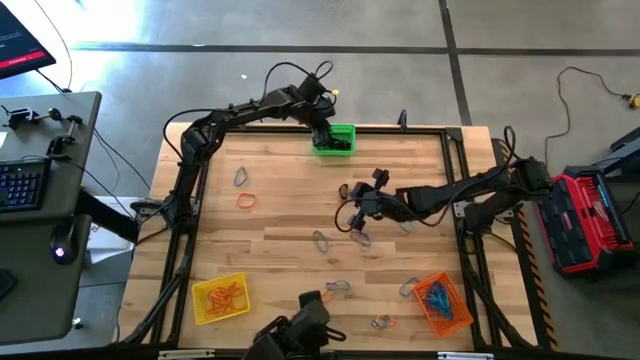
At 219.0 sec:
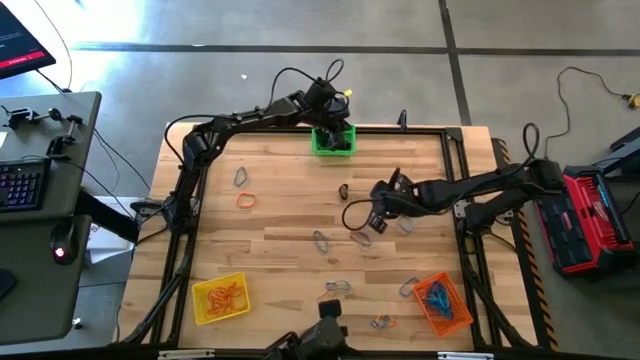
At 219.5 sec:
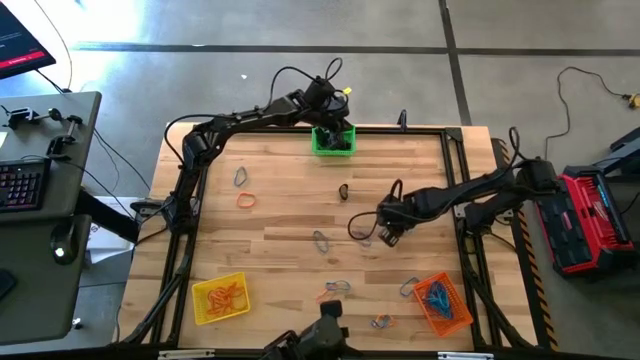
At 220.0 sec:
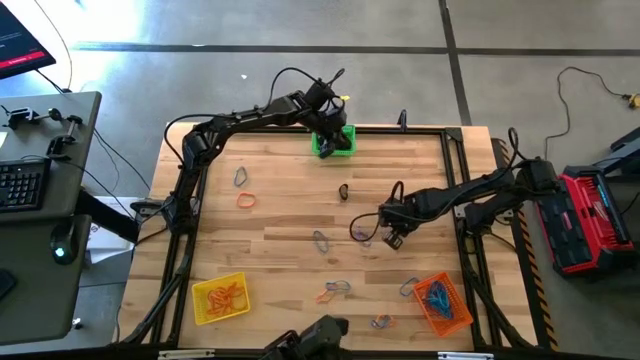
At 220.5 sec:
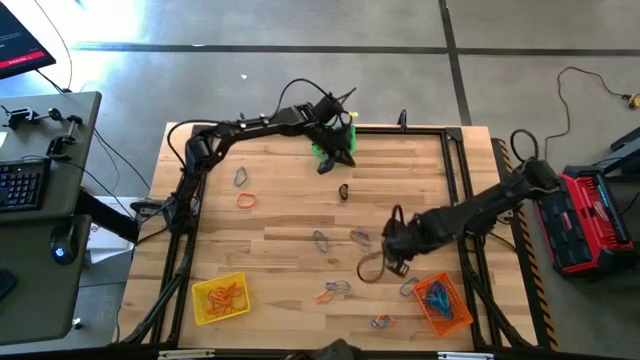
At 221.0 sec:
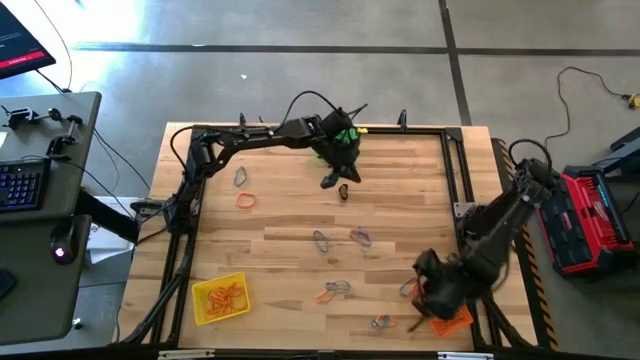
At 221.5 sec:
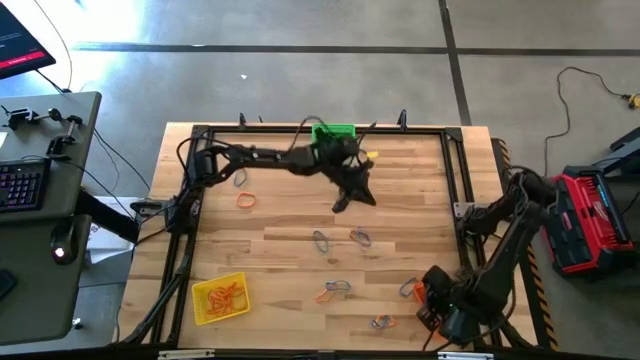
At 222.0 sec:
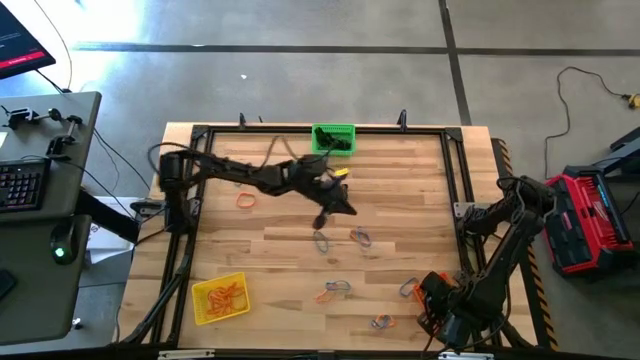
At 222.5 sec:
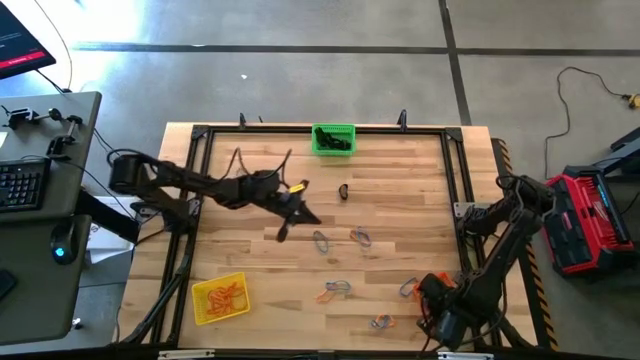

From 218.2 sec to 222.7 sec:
Task: Sort rubber bands into baskets
Put the blue rubber band into the orange bin

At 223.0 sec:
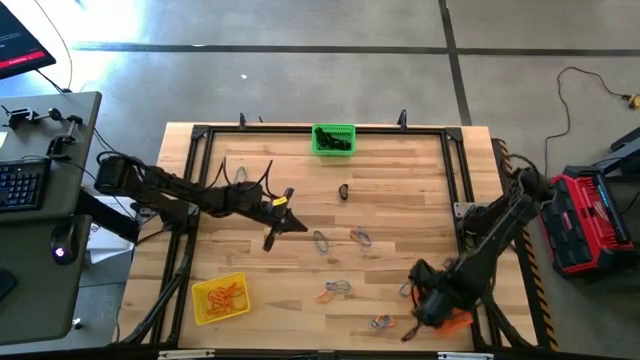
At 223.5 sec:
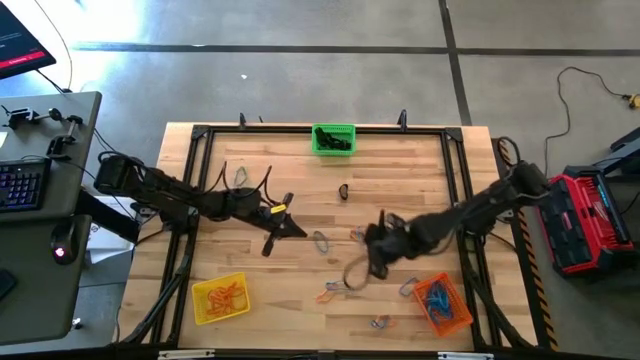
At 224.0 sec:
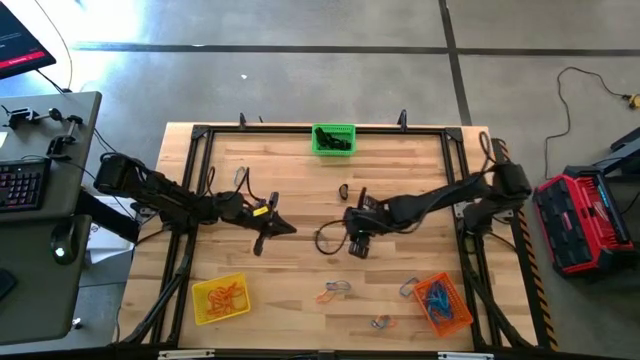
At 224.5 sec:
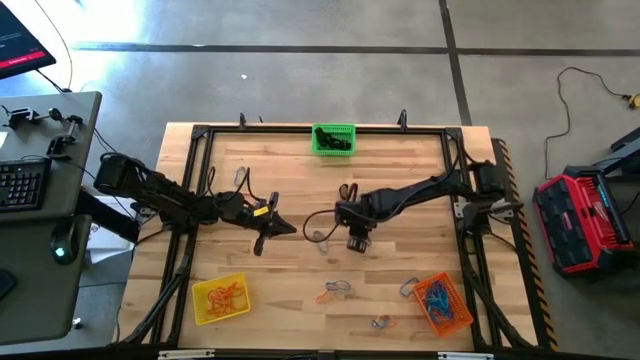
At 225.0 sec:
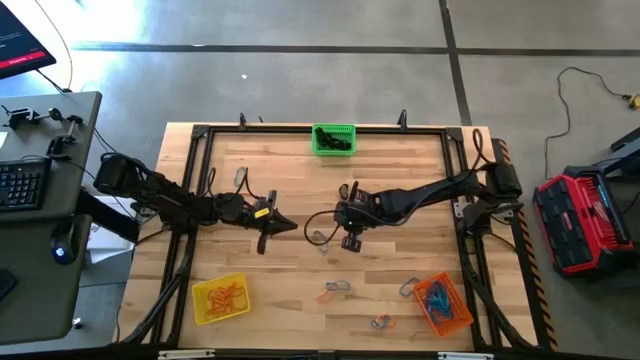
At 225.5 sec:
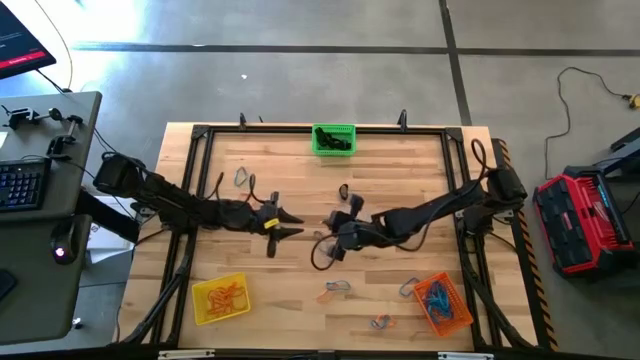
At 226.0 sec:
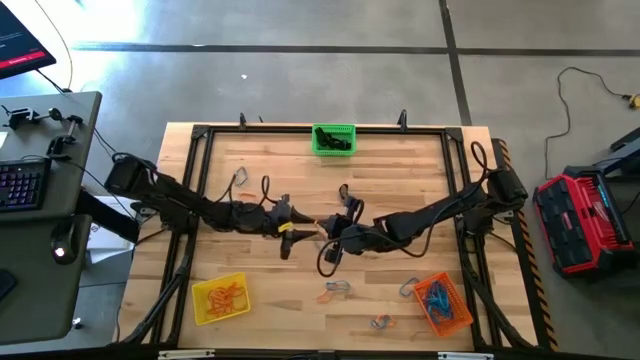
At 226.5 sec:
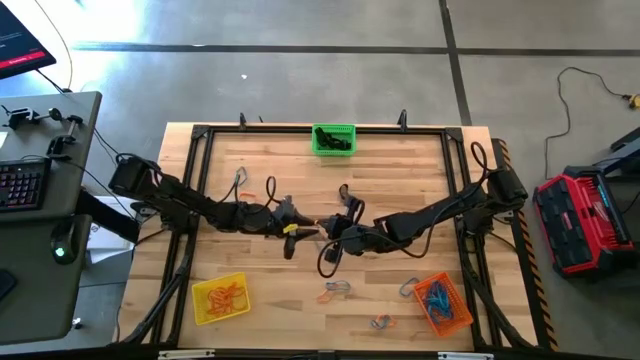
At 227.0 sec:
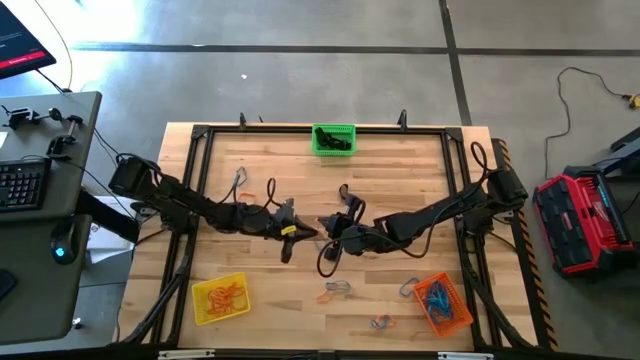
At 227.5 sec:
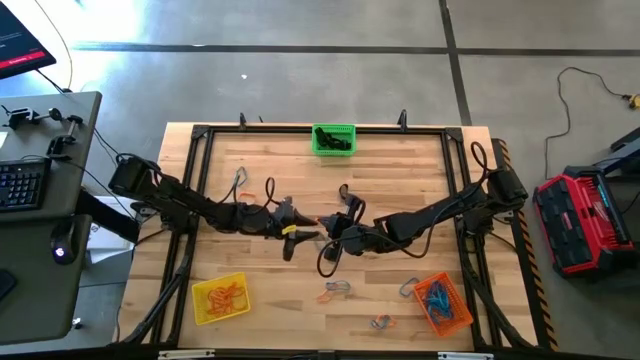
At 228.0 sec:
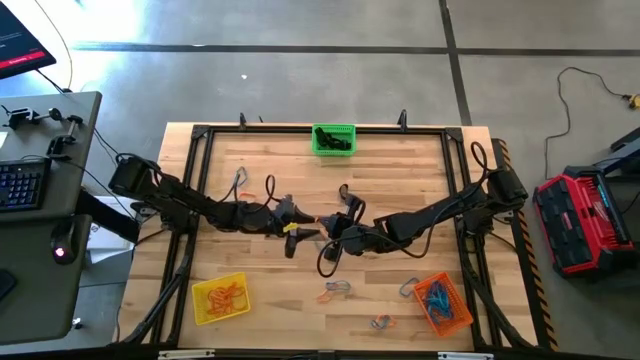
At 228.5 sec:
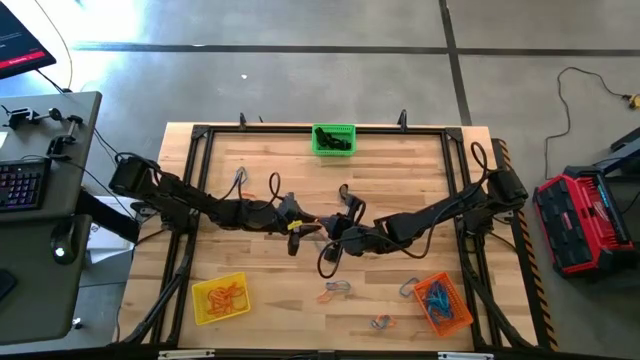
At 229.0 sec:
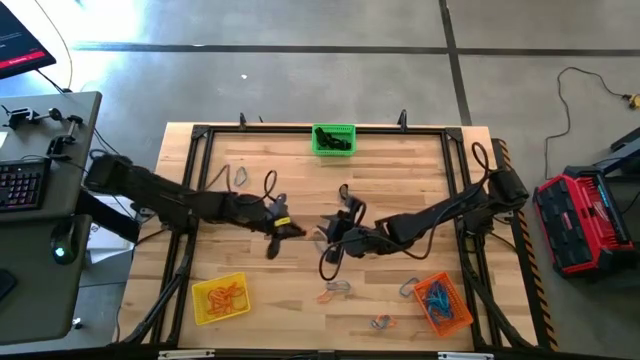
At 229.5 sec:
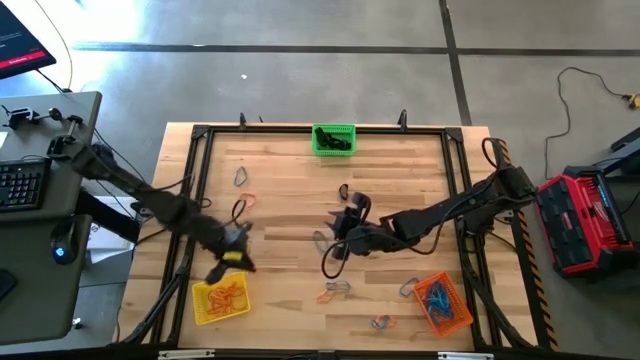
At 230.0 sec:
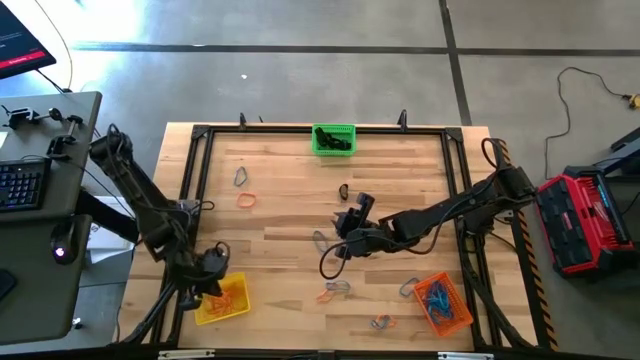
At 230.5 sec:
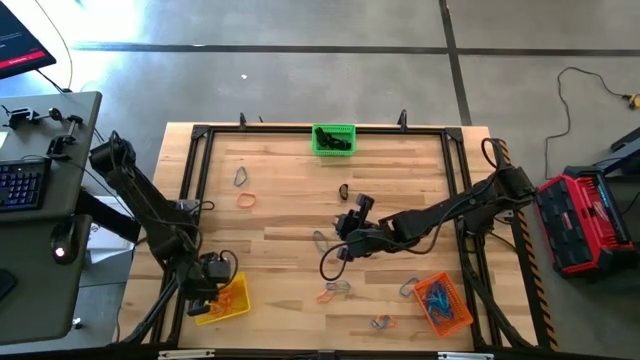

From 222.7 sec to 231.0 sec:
Put the orange rubber band into the yellow bin

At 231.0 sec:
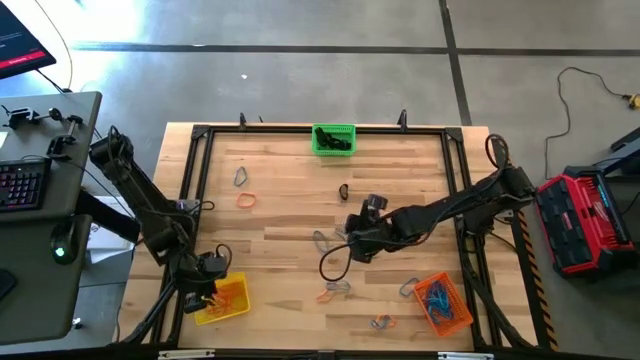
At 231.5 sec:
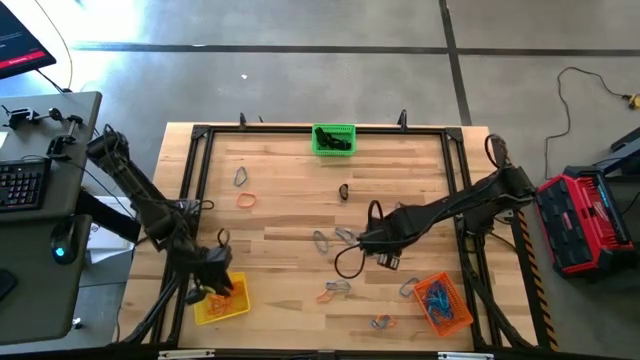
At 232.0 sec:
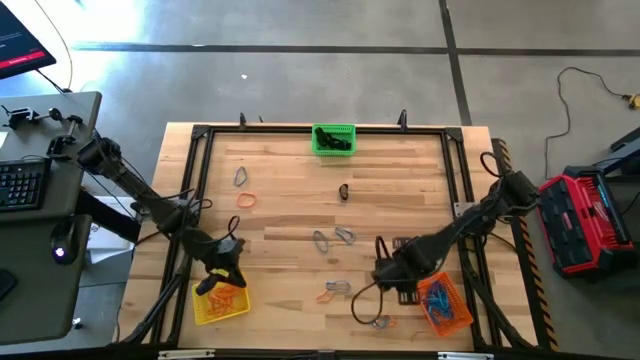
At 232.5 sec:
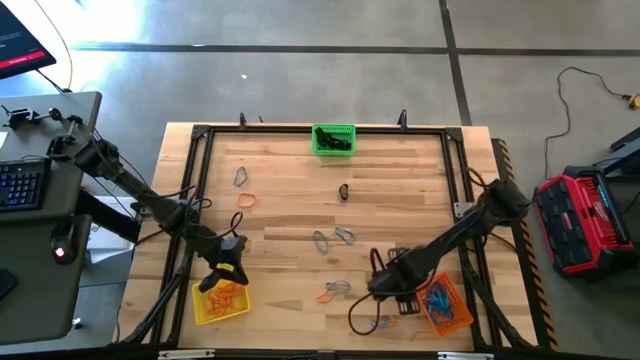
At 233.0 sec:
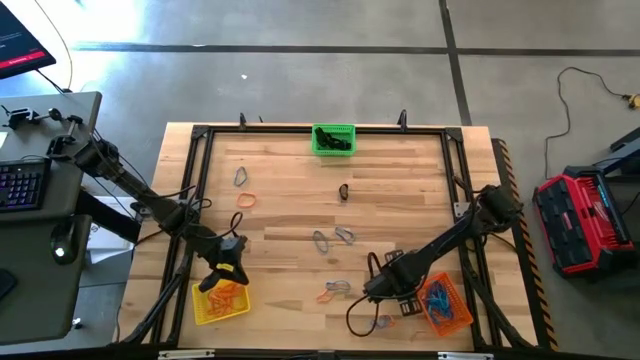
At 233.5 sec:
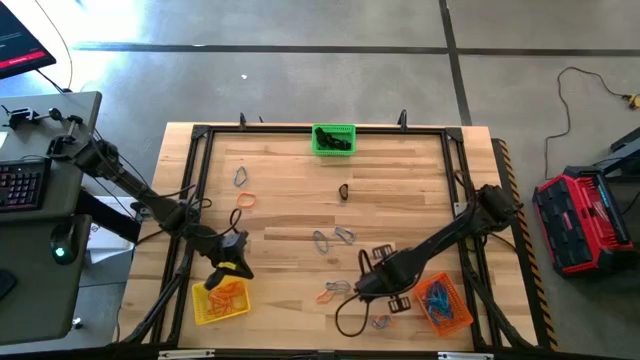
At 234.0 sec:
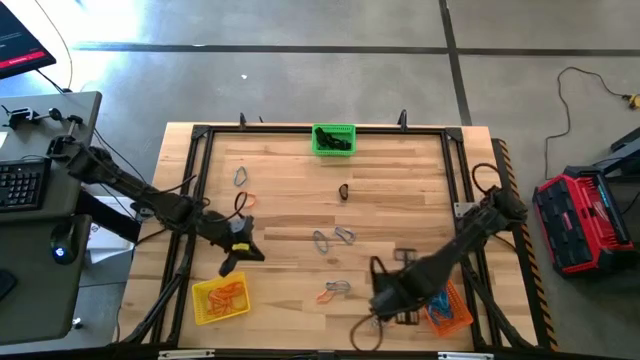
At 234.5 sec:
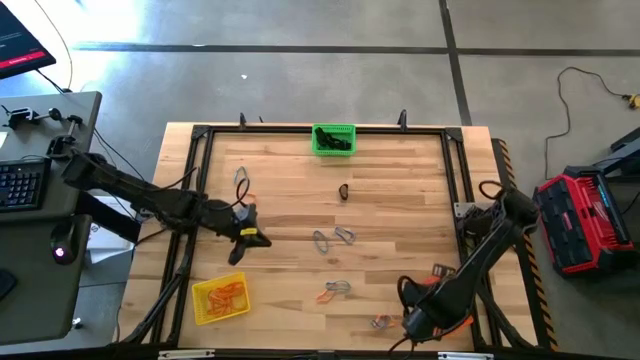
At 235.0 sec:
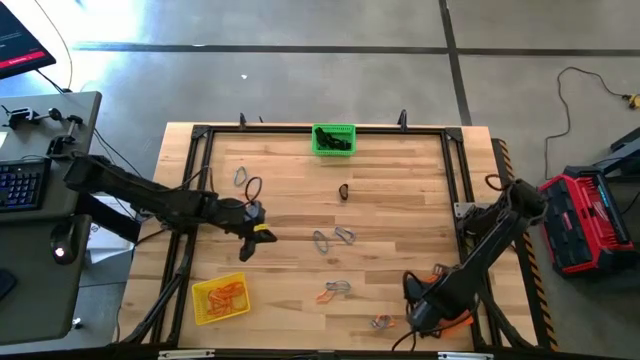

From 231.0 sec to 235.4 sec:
Put the blue rubber band into the orange bin

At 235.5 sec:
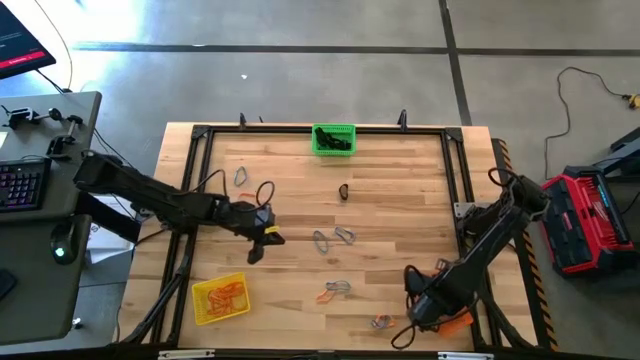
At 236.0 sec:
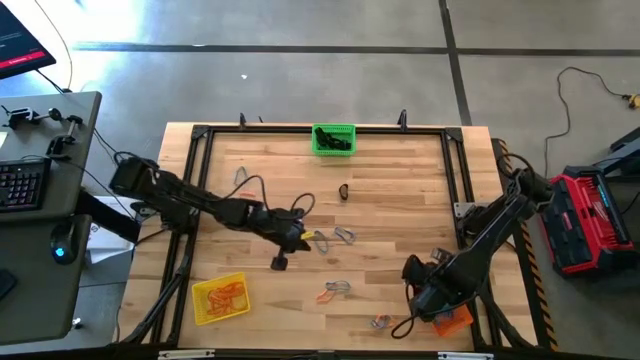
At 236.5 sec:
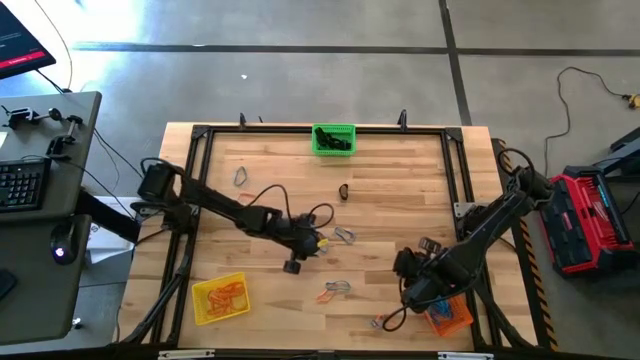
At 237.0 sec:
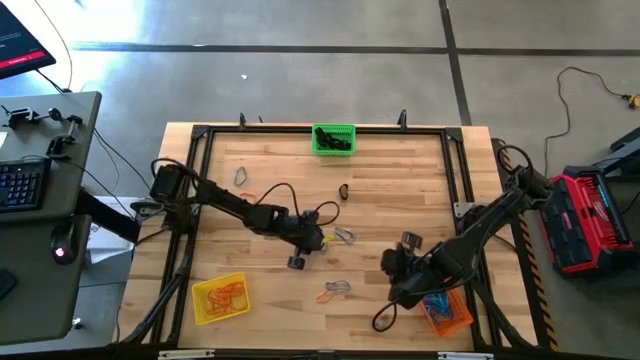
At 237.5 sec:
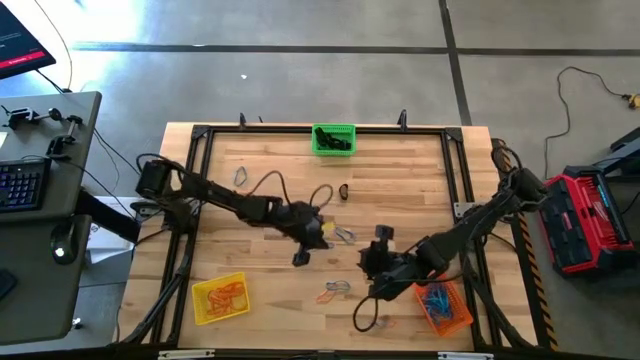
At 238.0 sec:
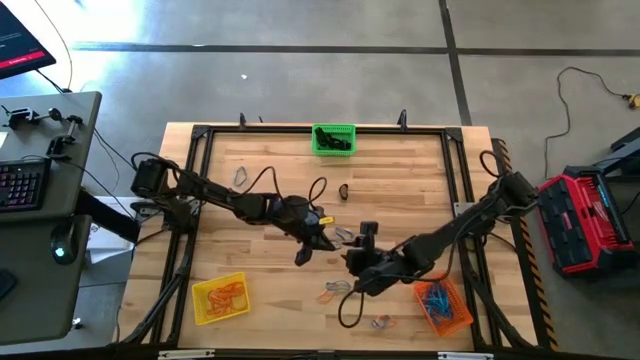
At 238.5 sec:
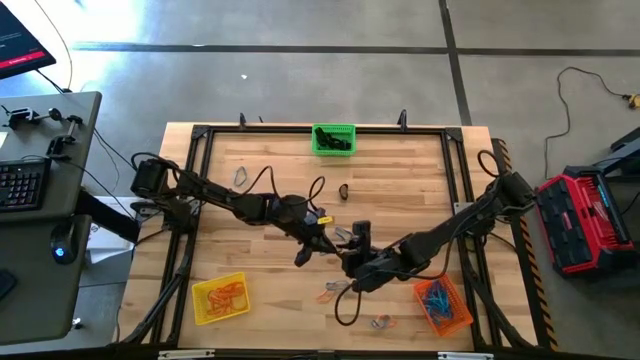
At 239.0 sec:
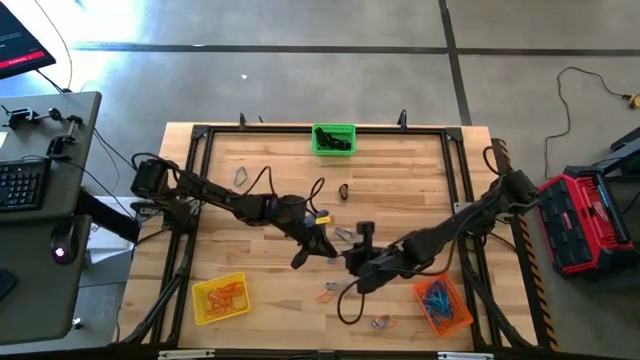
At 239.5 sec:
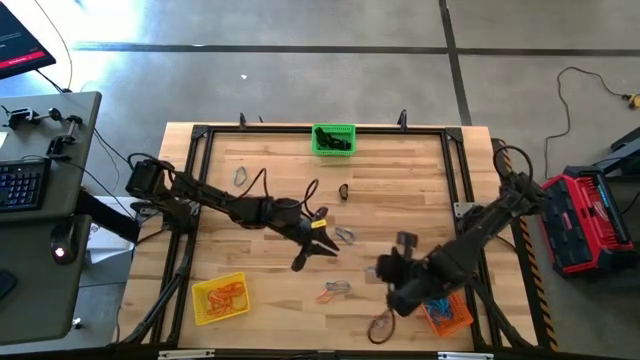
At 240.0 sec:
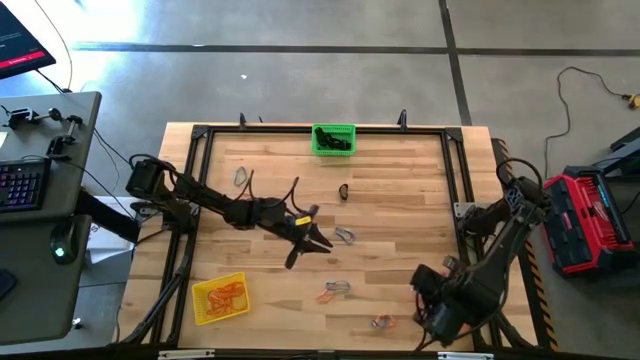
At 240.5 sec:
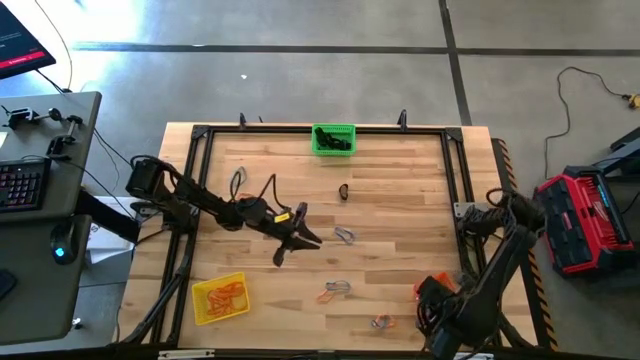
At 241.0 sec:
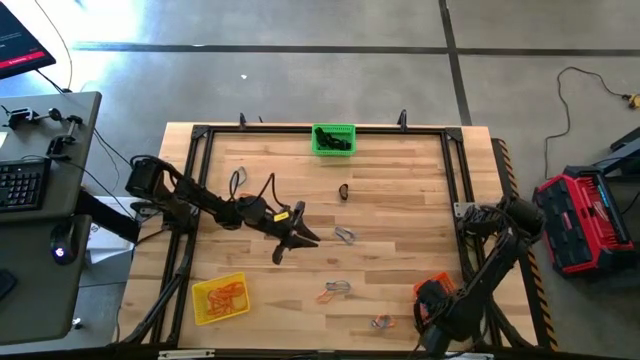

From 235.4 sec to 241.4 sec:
Put the blue rubber band into the orange bin
